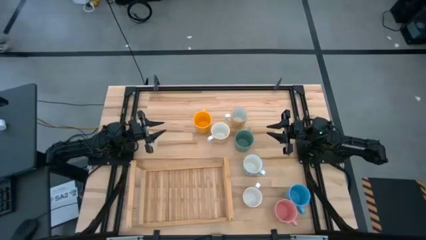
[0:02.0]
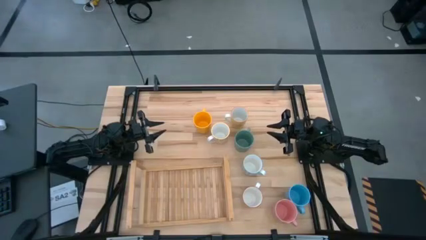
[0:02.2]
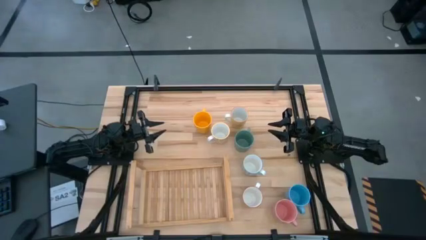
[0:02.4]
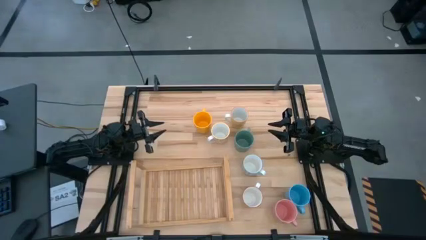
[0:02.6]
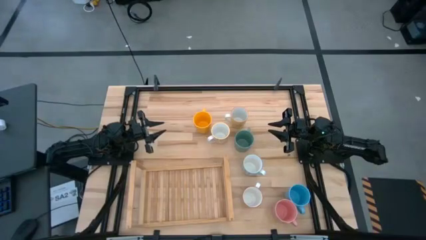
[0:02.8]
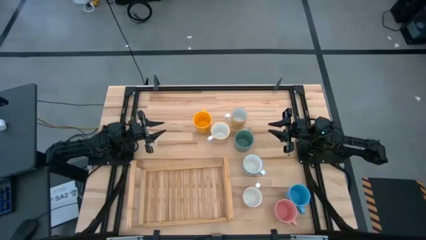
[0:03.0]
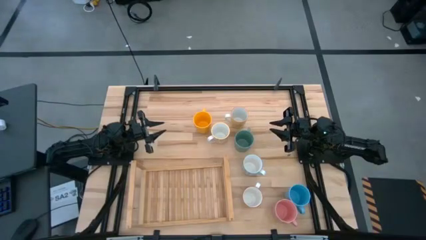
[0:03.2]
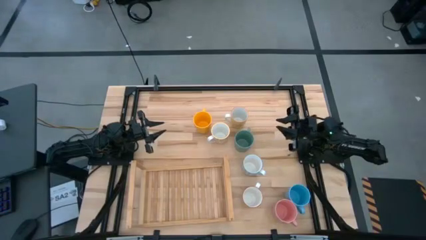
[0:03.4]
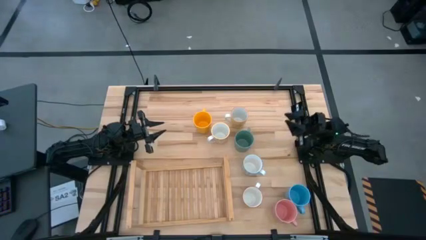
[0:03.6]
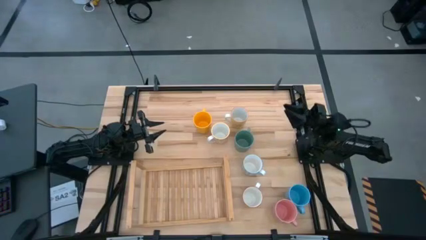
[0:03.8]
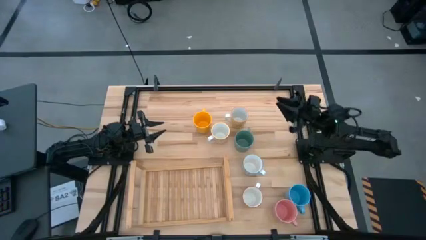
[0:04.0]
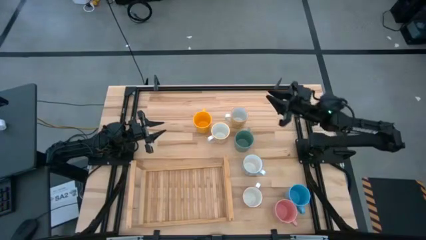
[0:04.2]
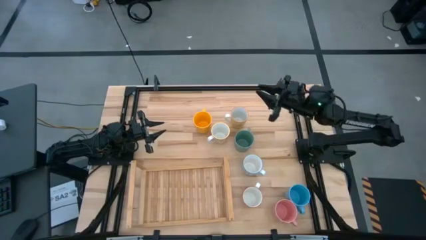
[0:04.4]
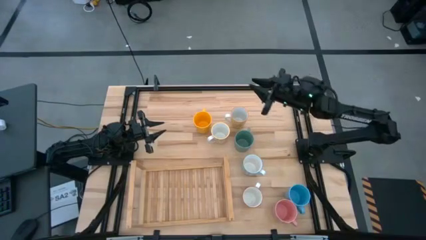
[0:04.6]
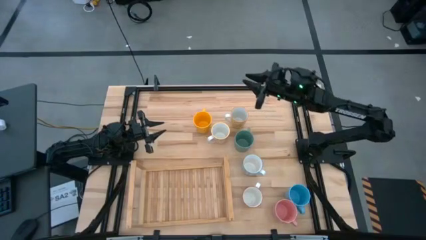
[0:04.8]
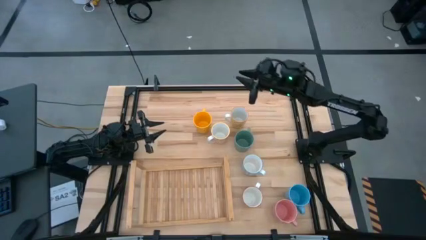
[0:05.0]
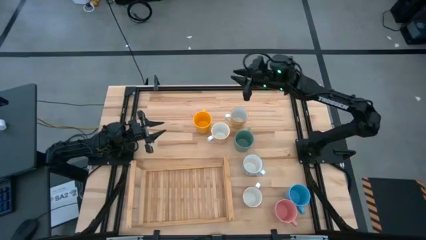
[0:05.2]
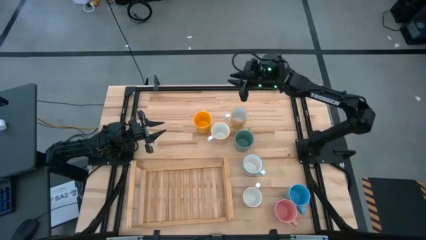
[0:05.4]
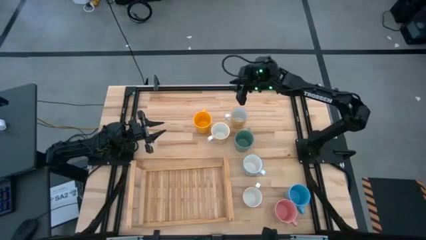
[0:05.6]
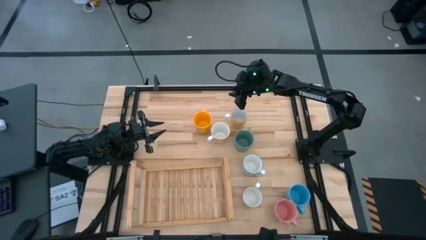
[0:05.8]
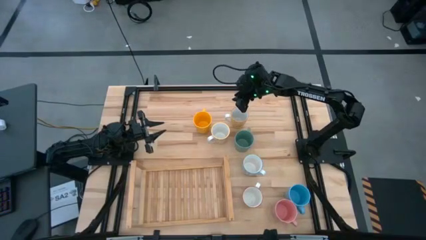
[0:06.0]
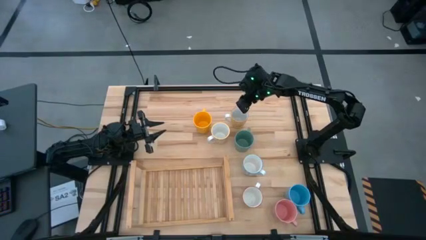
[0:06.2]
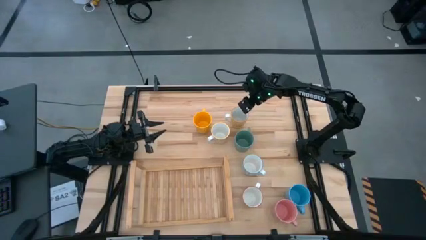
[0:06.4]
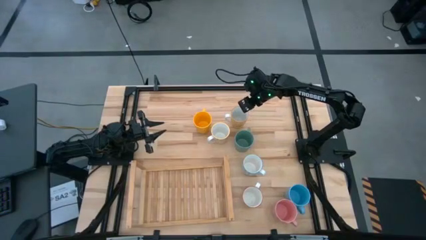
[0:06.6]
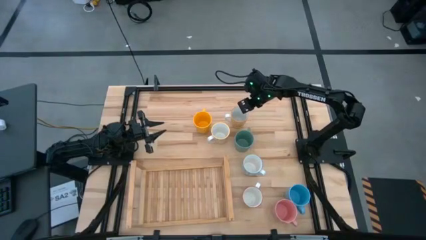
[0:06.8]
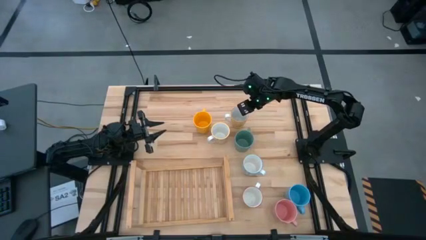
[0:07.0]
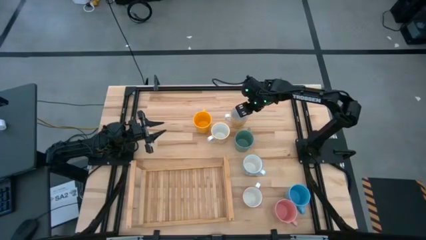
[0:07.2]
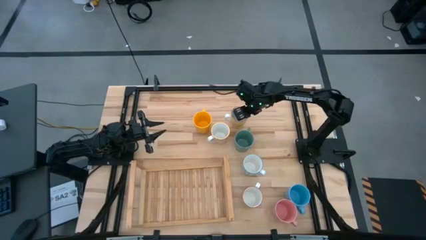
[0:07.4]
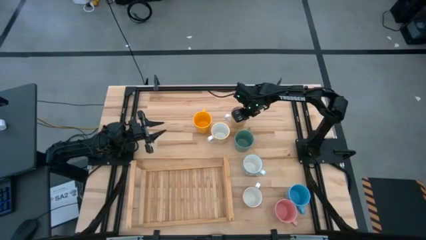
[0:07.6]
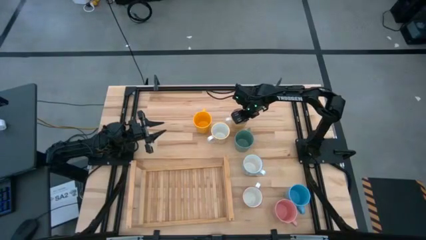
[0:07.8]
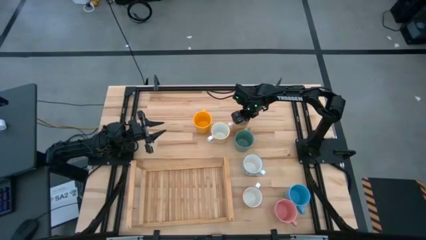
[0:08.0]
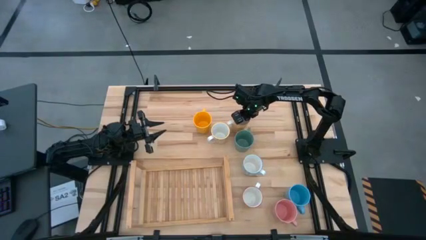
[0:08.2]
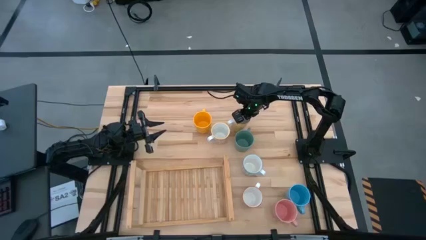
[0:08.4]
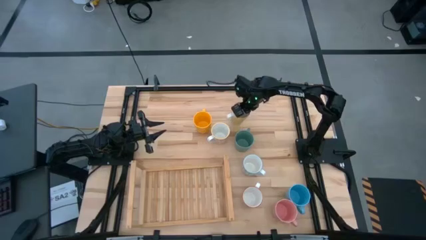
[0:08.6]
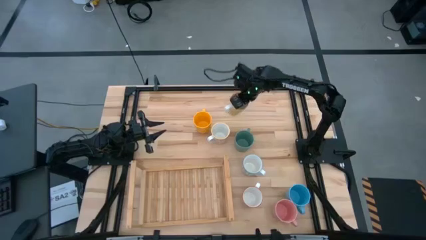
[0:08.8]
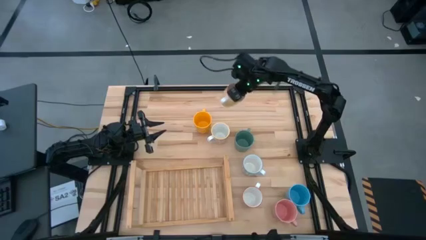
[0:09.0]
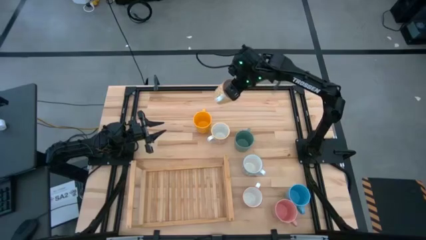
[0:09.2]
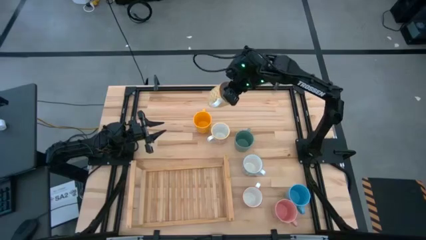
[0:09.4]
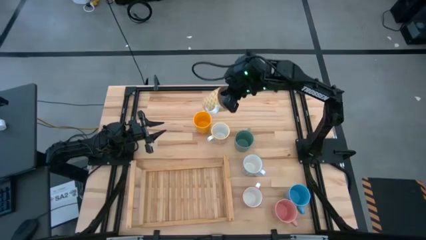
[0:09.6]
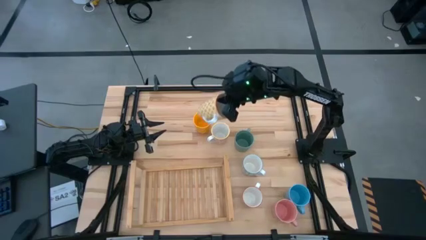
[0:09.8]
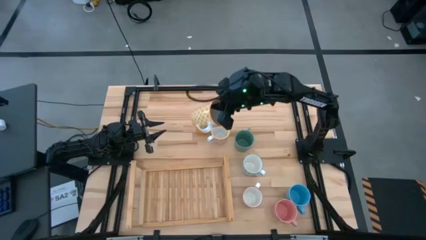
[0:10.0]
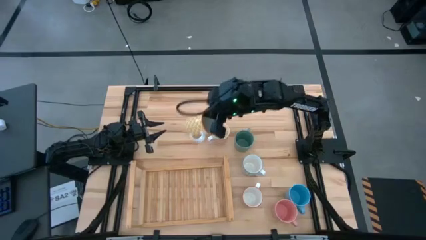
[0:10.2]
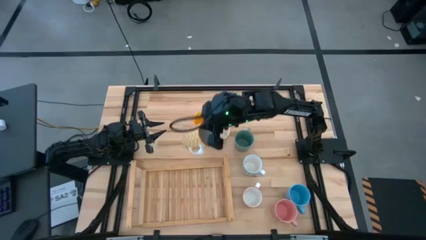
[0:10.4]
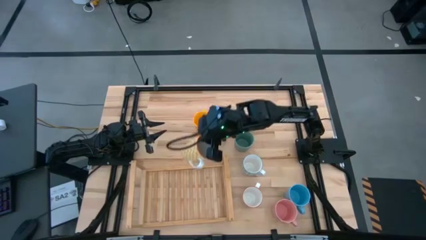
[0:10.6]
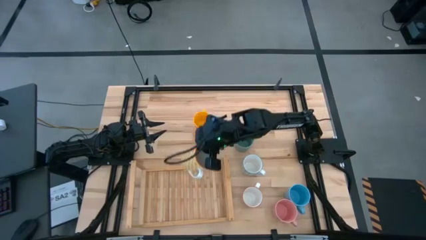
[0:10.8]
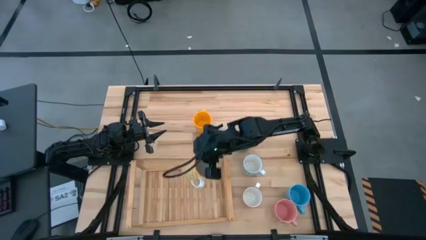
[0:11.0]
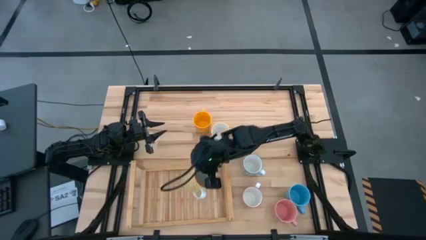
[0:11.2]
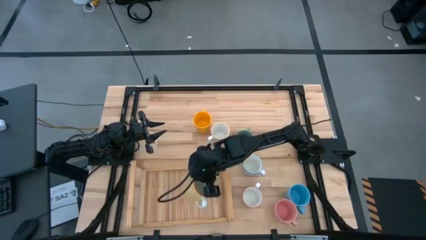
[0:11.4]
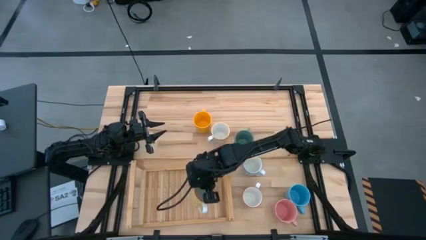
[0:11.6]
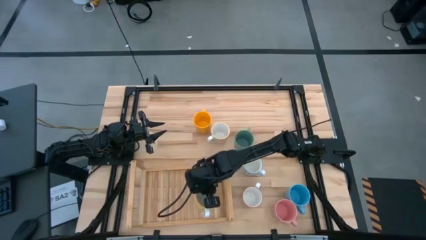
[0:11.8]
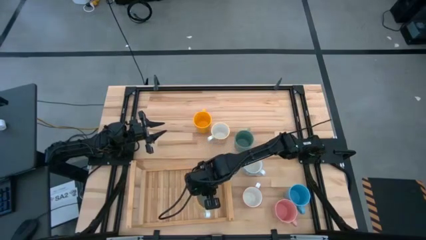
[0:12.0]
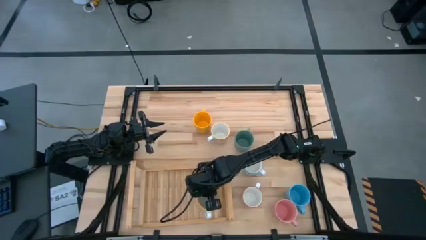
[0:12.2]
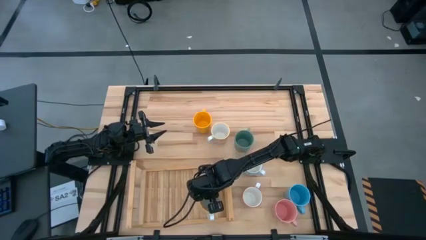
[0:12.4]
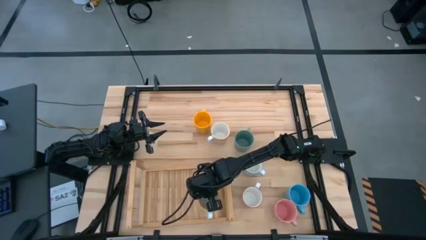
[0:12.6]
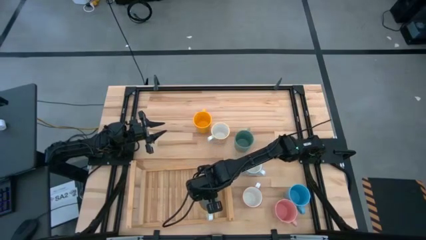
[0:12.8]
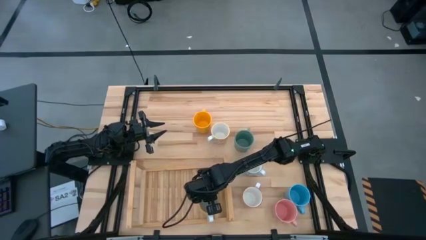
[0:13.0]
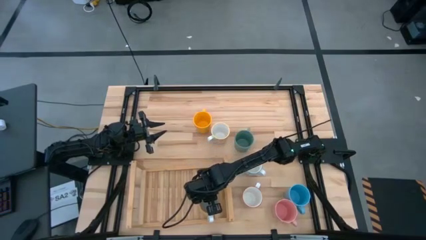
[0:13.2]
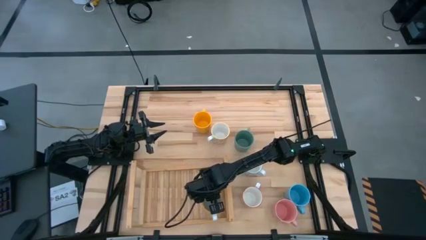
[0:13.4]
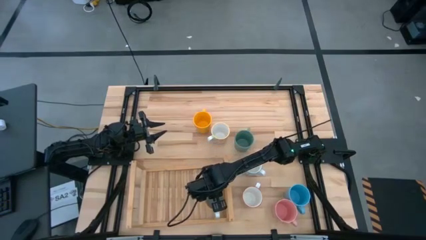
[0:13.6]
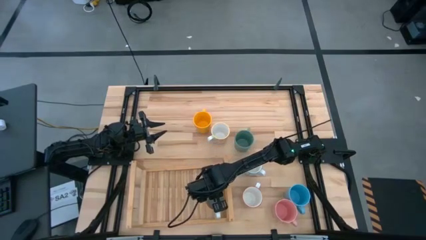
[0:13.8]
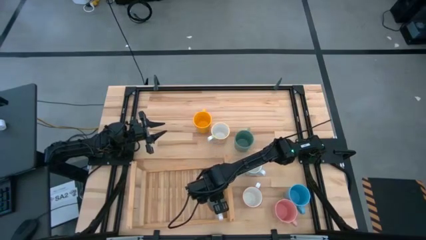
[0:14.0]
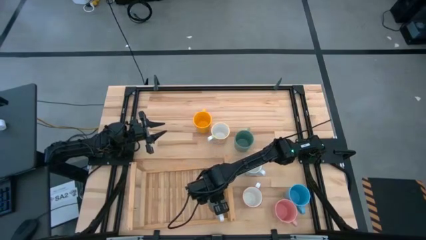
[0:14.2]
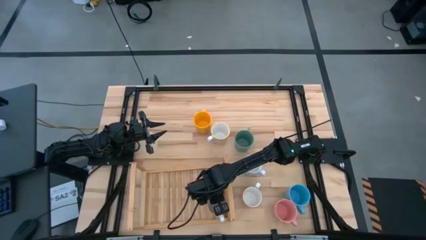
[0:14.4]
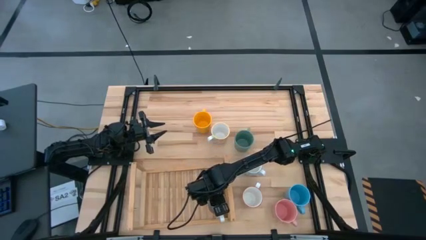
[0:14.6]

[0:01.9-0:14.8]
Task: Place coffee mugs
Put the yellow patterned mug on the shelf
